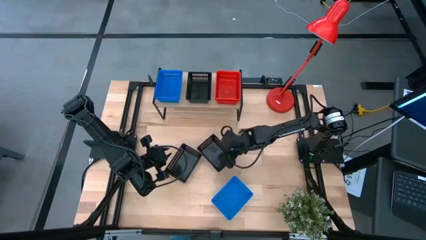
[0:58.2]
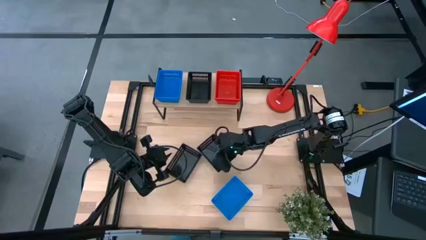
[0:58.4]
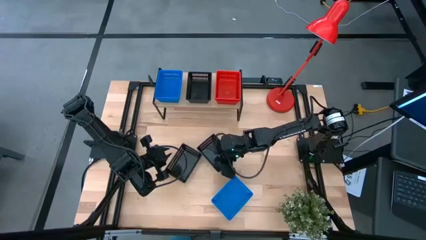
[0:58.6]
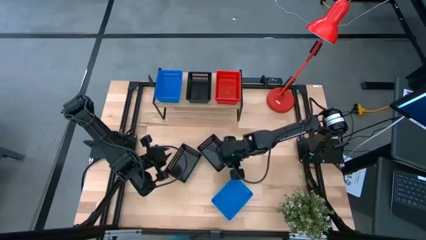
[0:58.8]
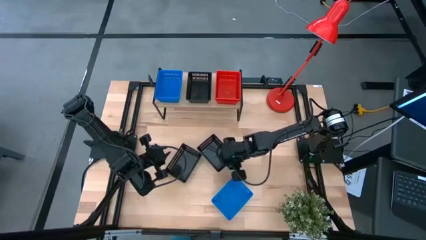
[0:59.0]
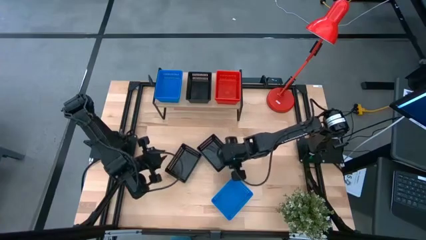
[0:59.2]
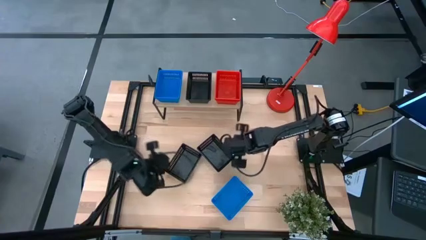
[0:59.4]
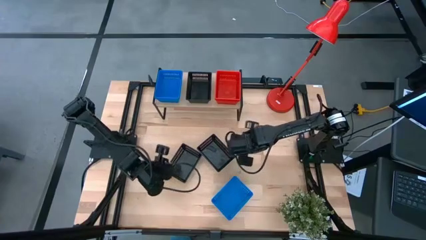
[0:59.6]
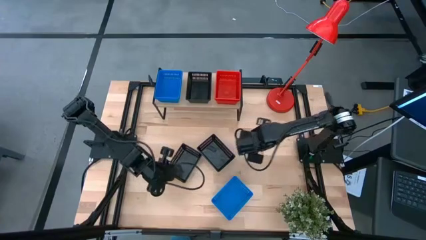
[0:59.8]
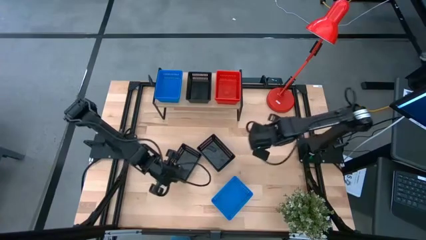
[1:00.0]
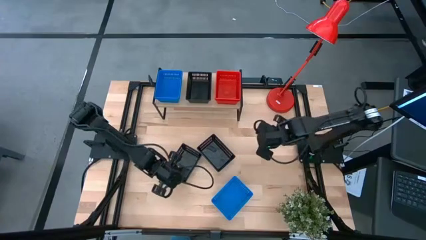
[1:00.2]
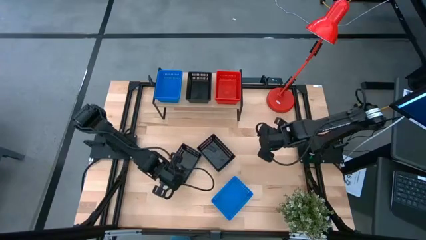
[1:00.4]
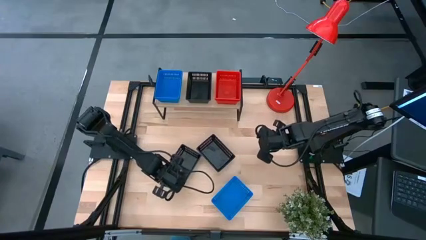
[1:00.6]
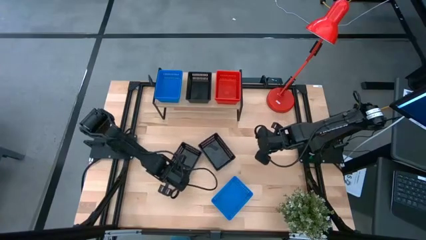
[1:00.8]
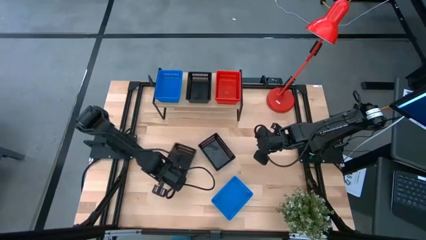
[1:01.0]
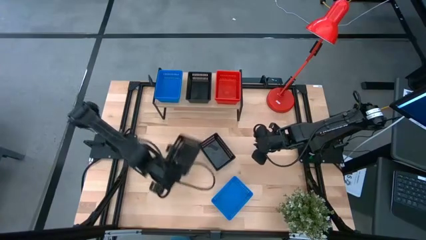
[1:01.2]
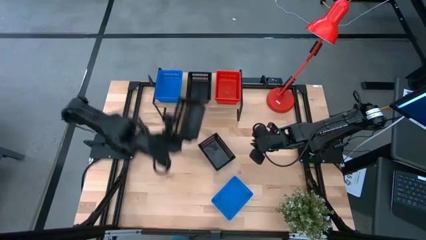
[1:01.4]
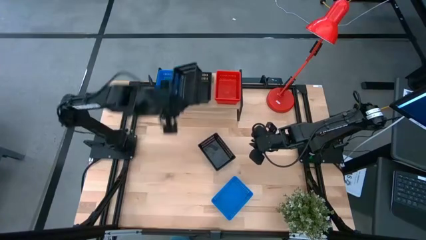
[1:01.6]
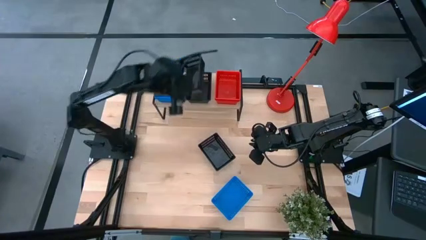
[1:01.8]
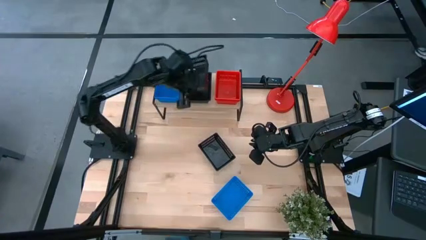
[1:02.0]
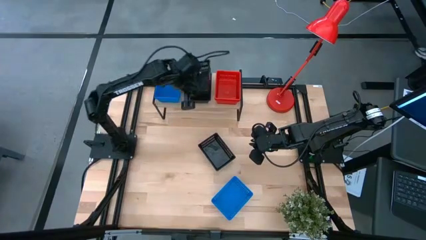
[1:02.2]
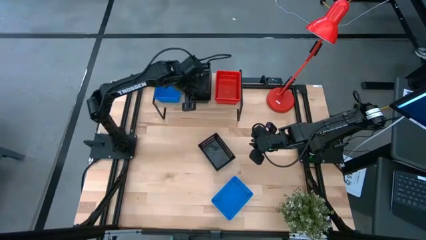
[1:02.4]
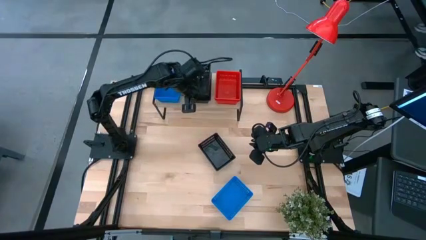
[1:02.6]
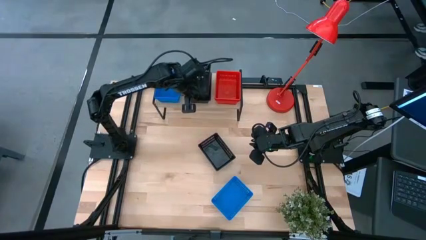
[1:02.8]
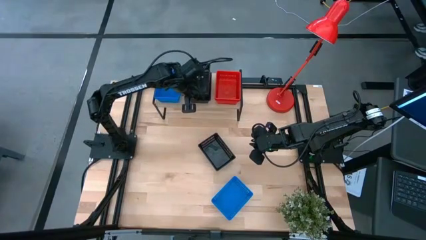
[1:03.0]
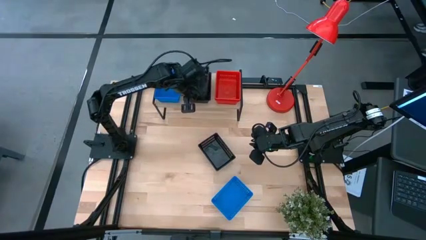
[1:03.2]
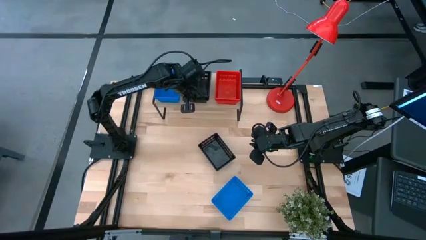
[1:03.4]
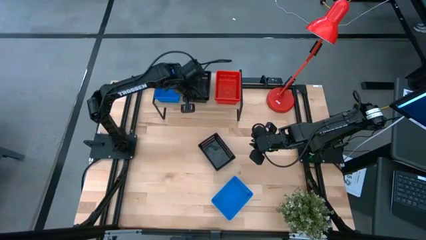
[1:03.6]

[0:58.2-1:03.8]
Task: Stack baskets on shelf by color
Stack the left black bin on top of the black bin on the shelf

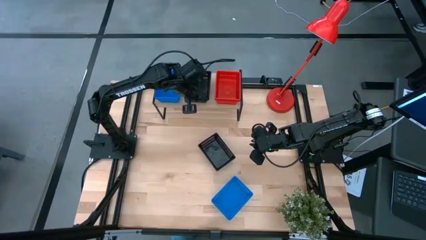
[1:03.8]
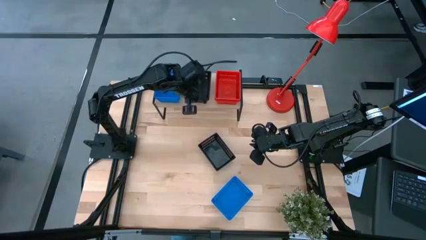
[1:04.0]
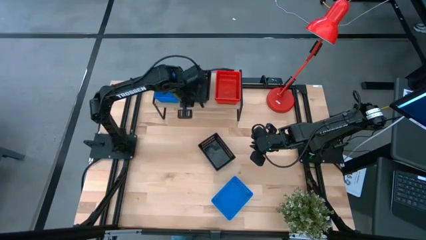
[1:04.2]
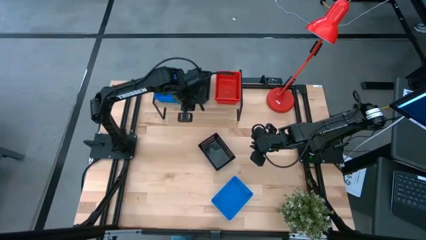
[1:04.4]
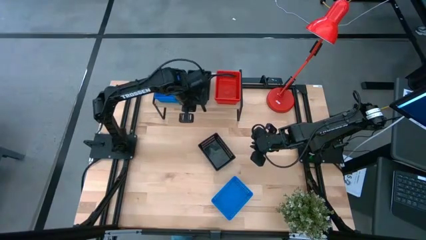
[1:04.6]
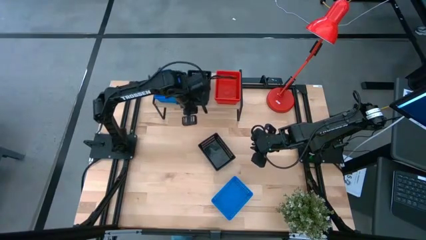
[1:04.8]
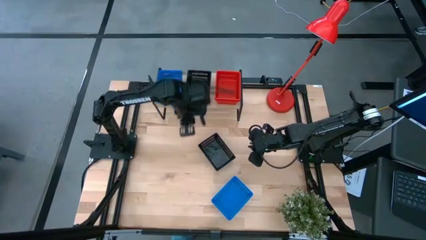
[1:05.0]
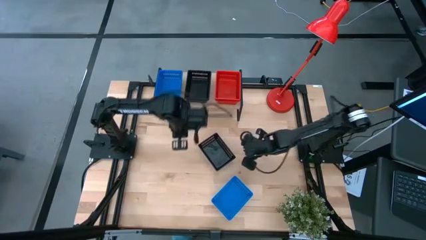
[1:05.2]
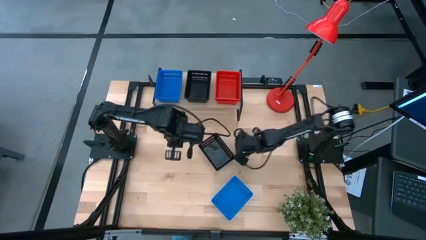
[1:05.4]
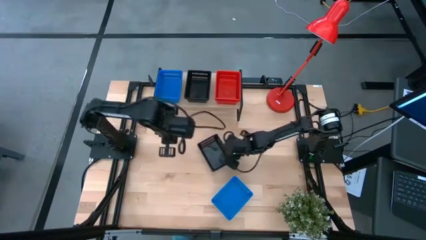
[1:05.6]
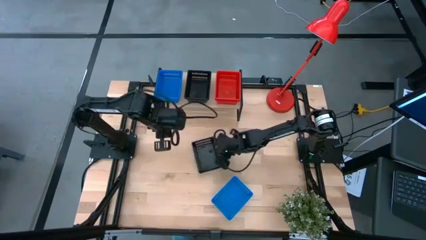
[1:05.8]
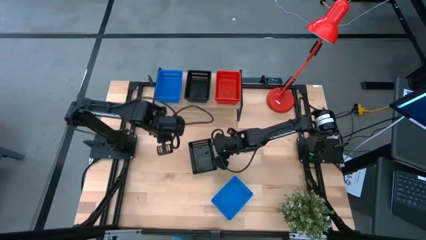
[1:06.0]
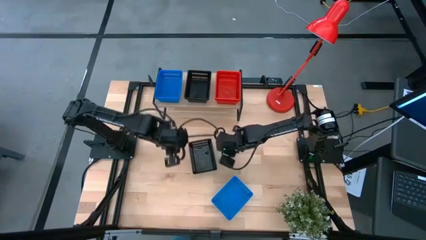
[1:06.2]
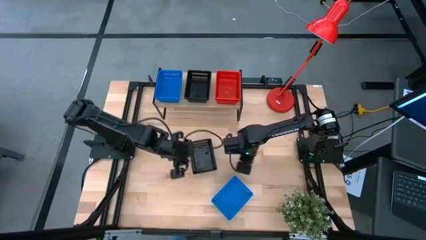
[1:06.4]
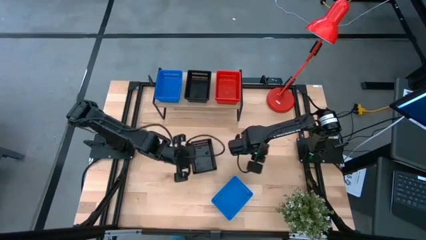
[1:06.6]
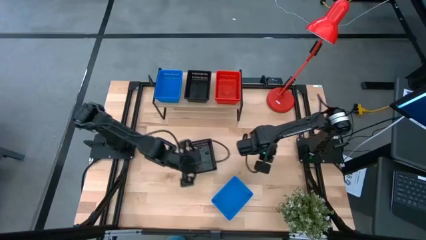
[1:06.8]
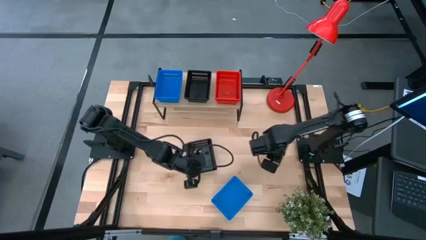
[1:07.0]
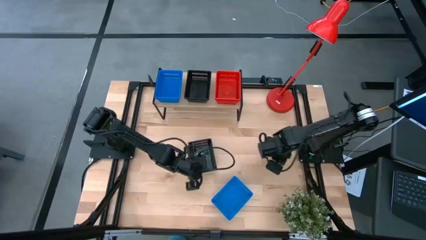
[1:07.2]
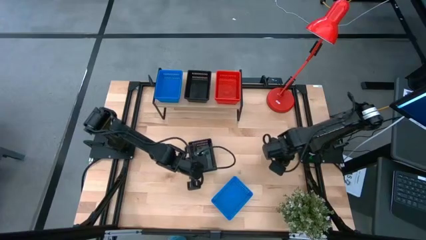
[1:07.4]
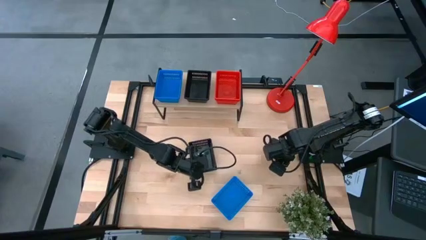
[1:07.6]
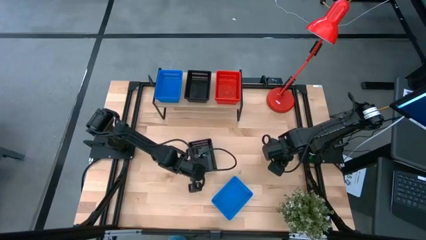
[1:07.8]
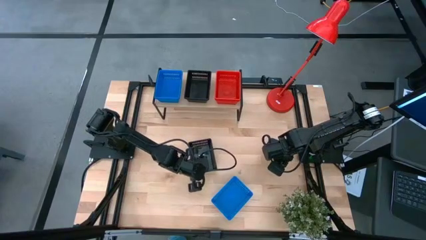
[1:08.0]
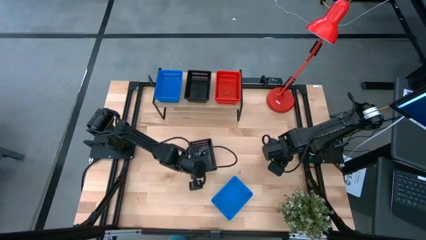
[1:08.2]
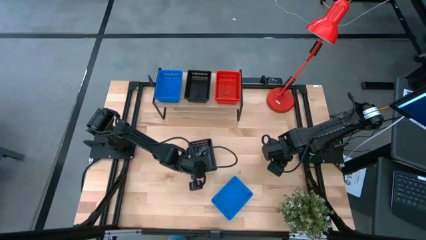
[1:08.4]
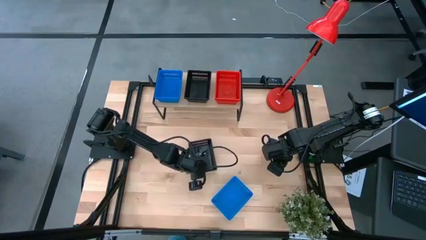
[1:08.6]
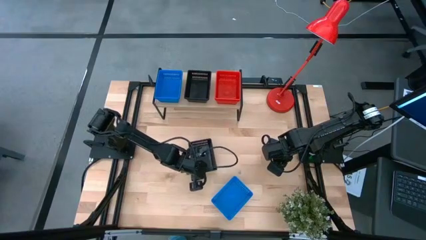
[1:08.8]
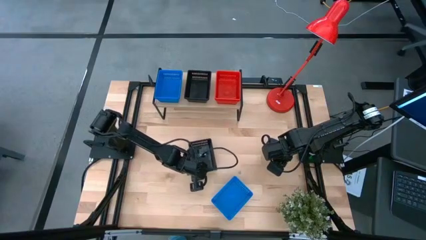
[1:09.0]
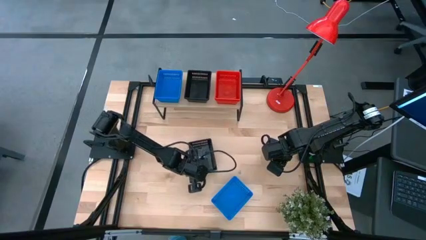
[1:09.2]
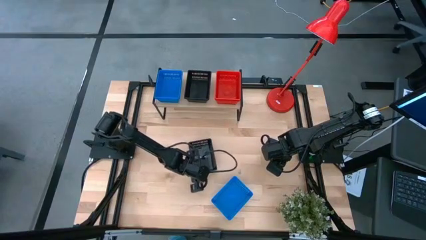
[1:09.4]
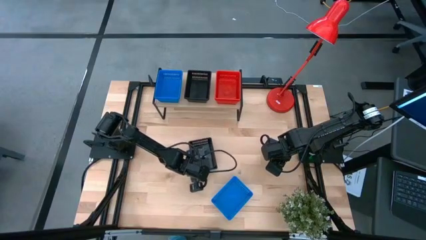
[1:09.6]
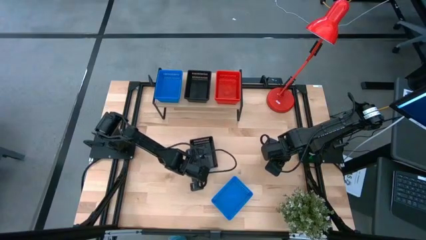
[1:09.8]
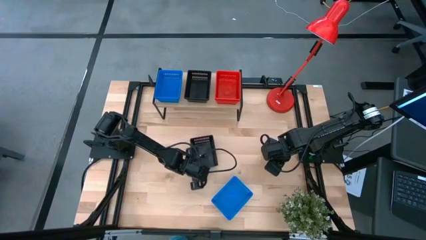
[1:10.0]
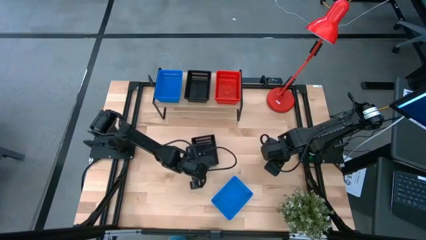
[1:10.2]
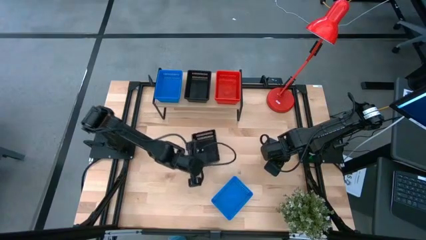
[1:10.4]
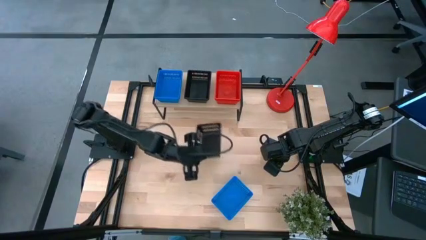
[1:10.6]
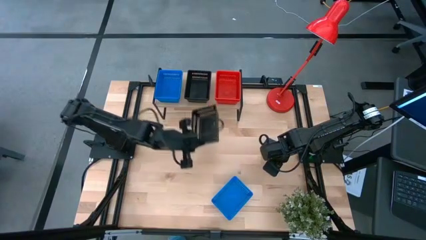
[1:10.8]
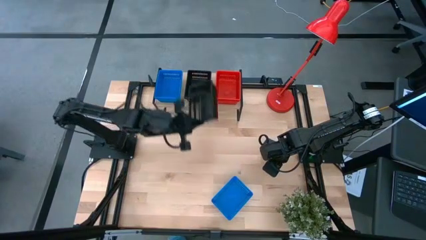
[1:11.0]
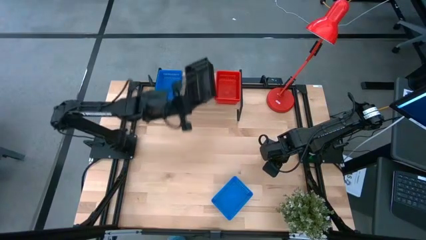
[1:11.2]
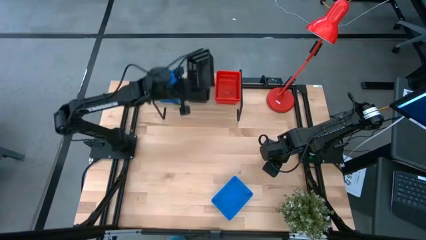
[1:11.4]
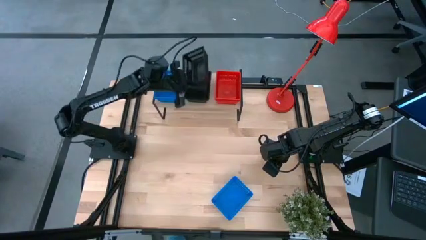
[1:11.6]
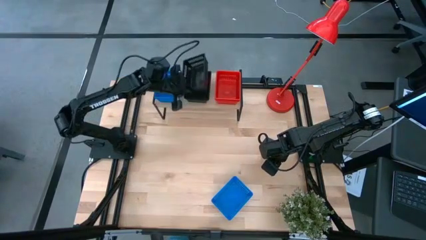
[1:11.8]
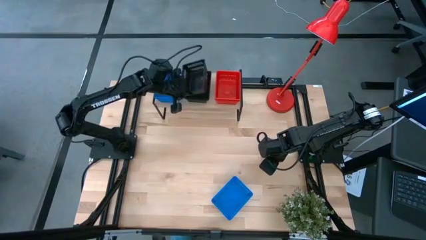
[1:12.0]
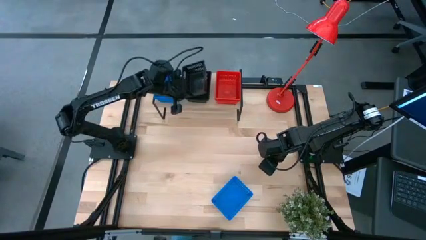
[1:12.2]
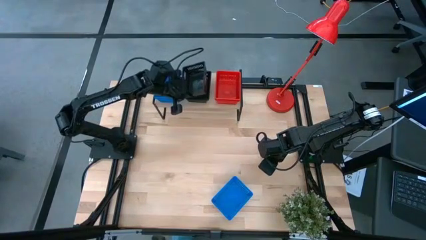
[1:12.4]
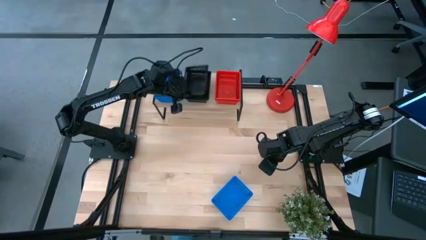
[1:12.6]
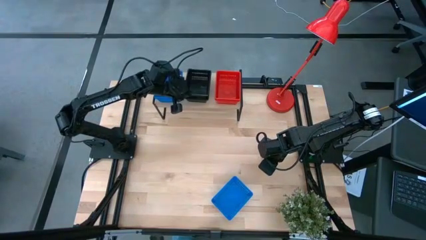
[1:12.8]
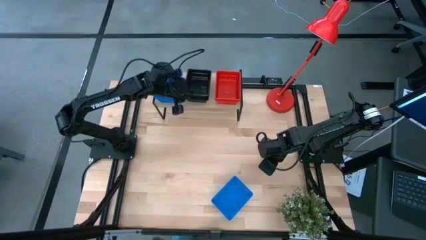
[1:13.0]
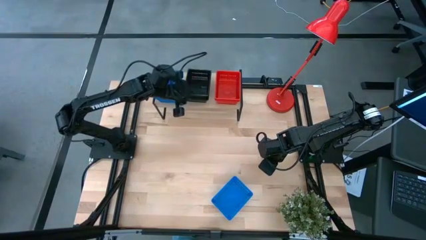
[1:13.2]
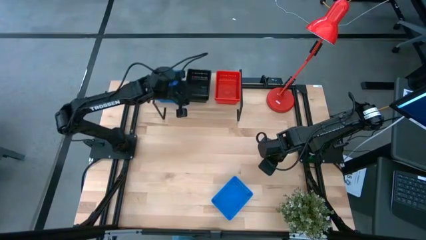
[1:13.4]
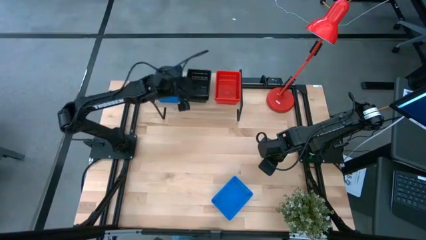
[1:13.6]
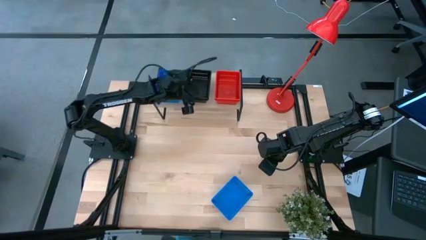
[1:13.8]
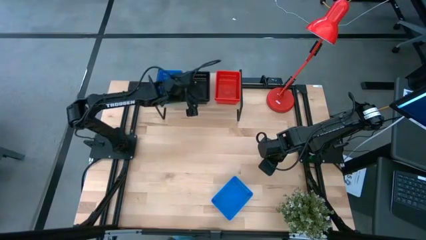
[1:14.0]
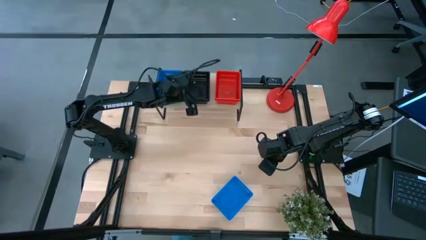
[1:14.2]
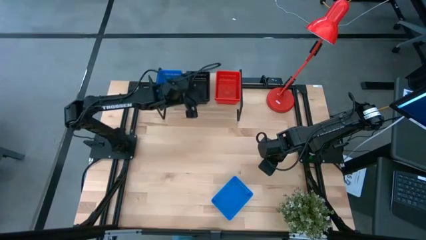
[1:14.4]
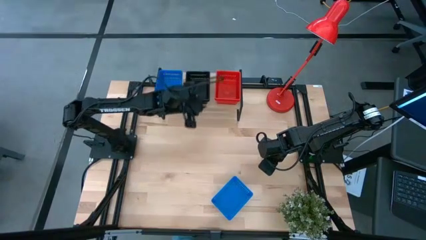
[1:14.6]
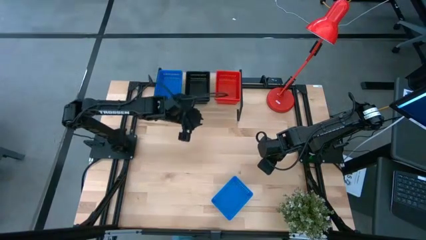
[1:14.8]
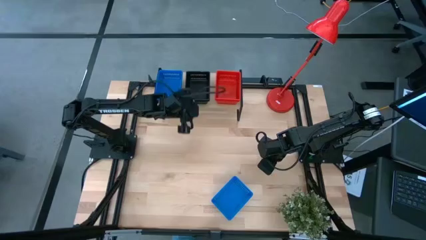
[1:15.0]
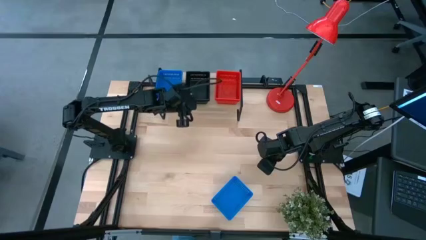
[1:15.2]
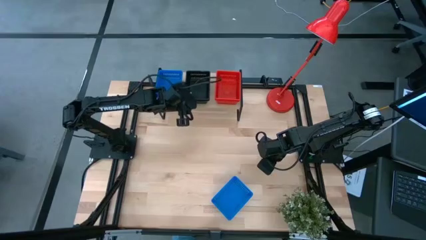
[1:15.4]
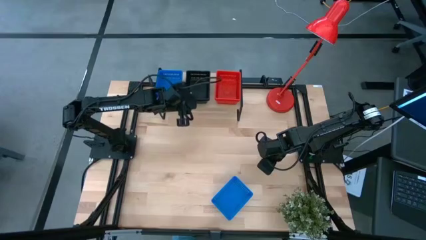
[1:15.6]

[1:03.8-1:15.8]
Stack the black bin on top of the black bins on the shelf
